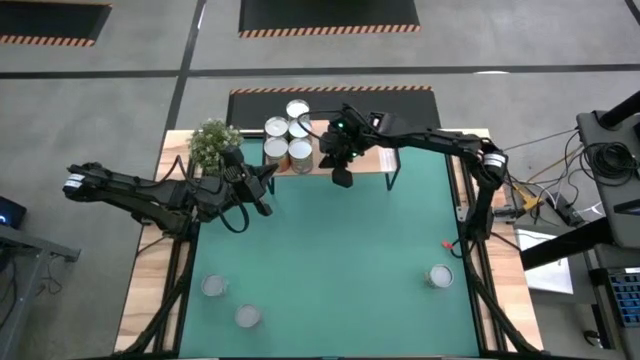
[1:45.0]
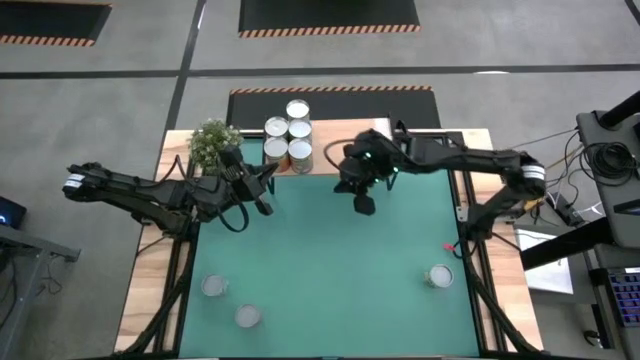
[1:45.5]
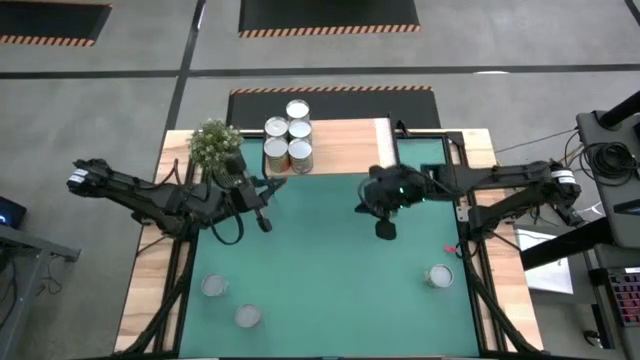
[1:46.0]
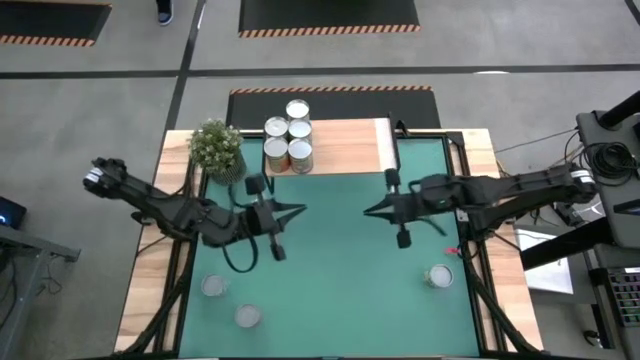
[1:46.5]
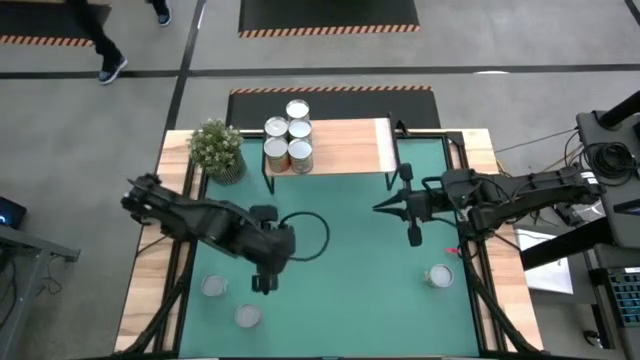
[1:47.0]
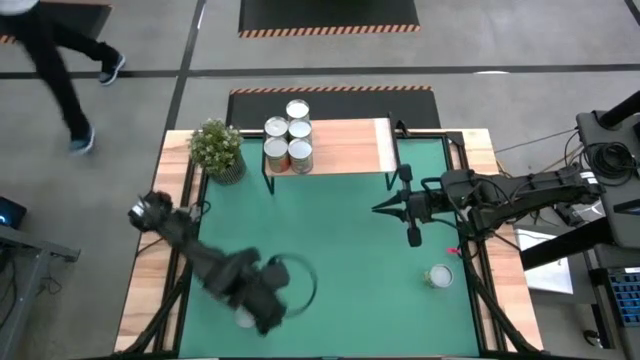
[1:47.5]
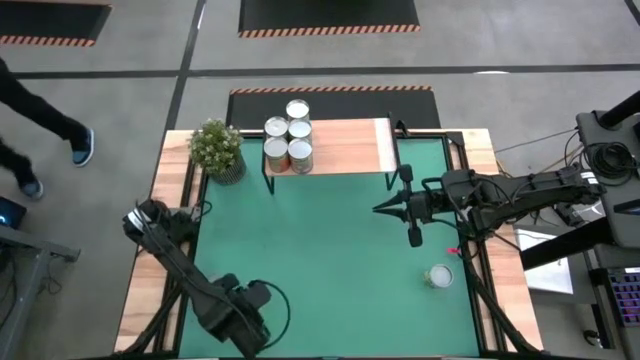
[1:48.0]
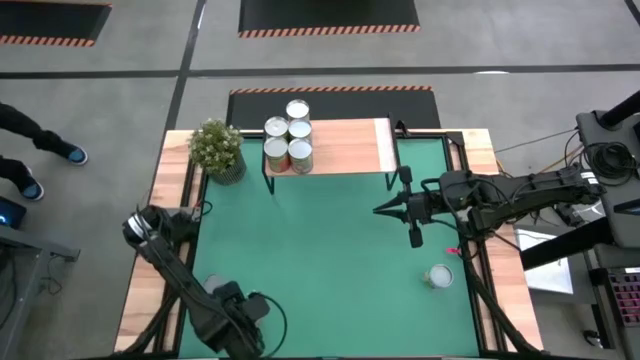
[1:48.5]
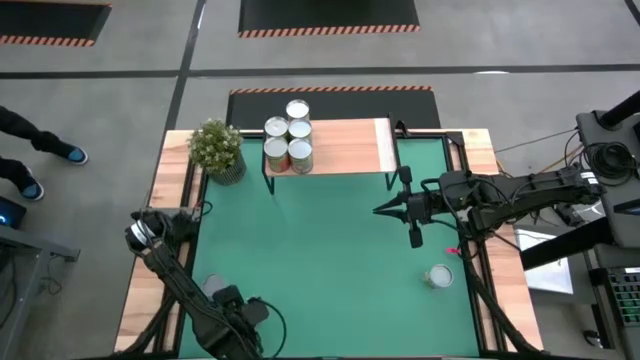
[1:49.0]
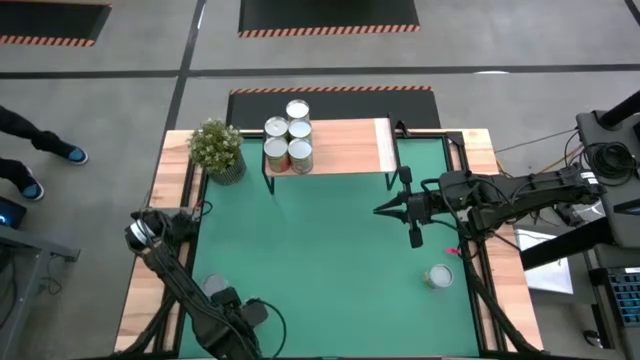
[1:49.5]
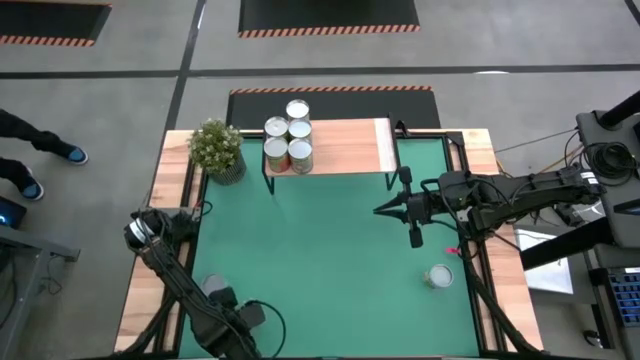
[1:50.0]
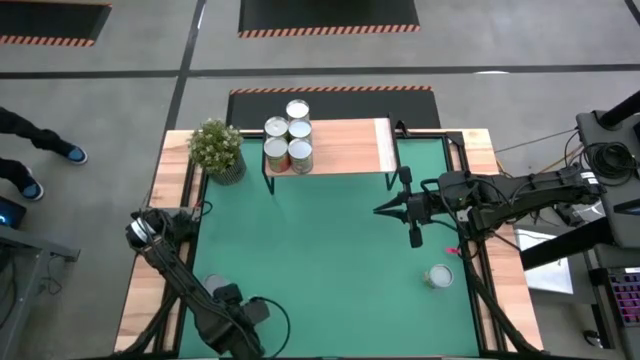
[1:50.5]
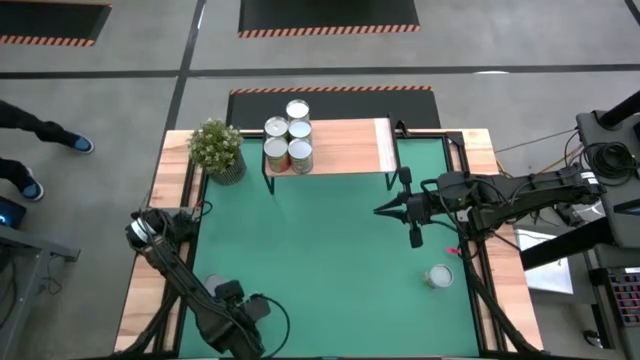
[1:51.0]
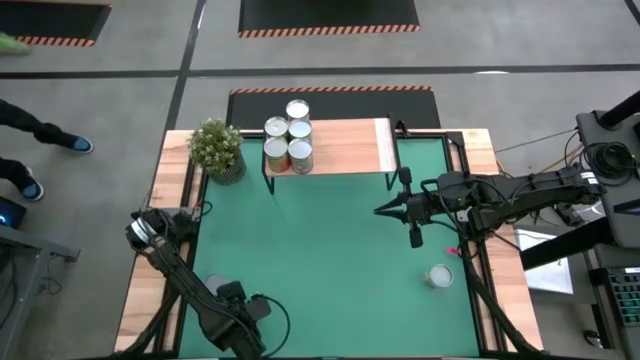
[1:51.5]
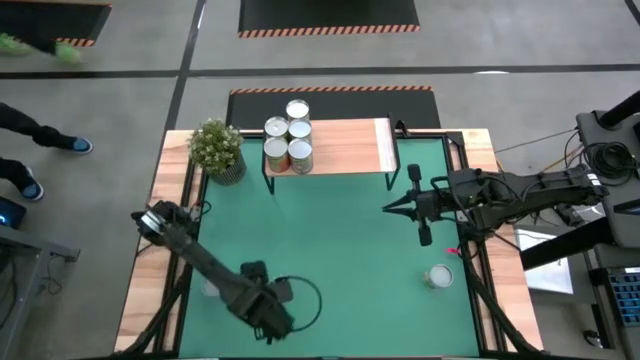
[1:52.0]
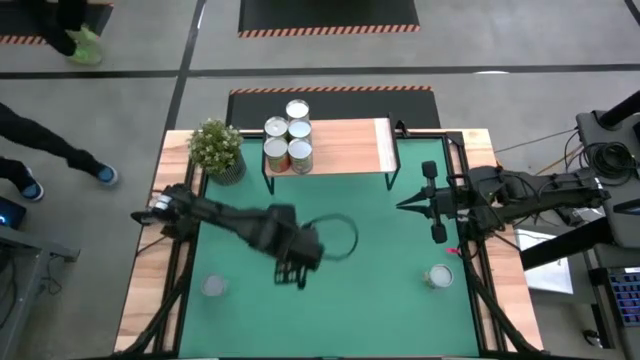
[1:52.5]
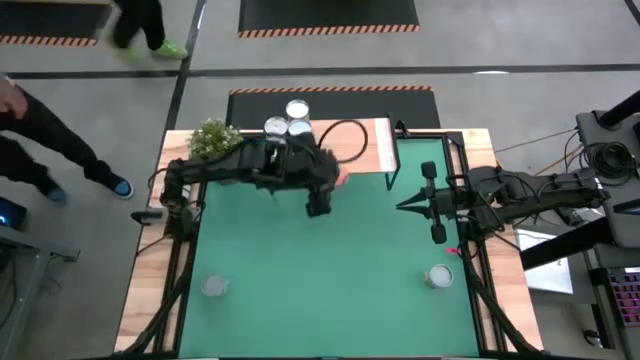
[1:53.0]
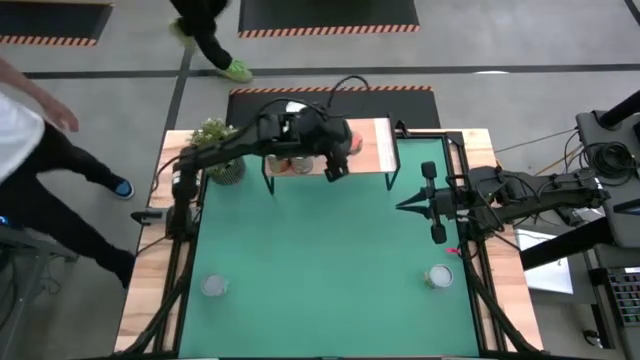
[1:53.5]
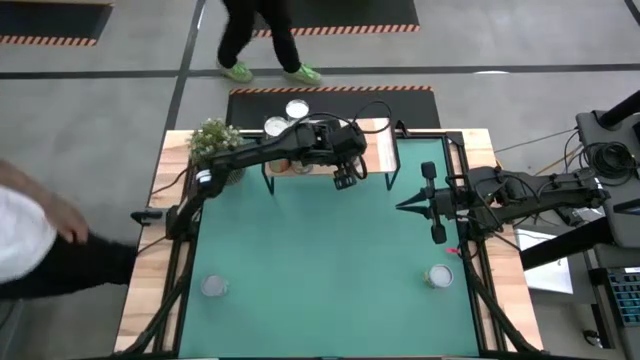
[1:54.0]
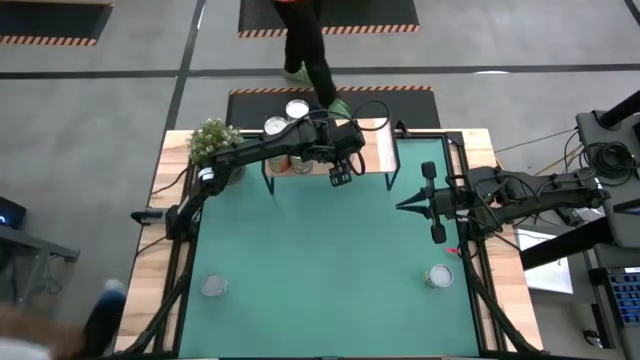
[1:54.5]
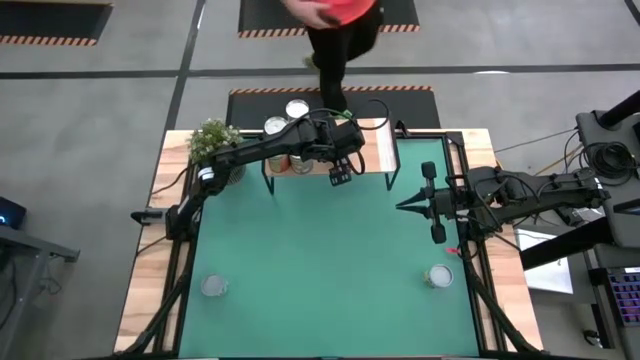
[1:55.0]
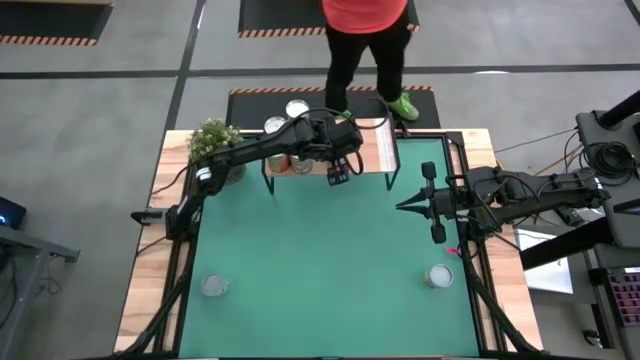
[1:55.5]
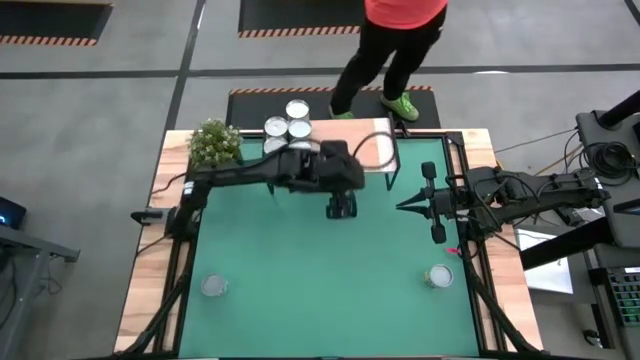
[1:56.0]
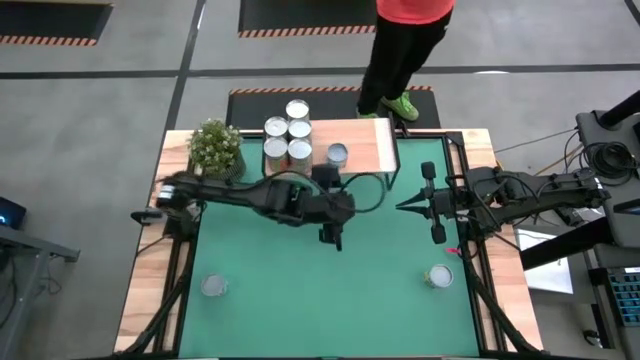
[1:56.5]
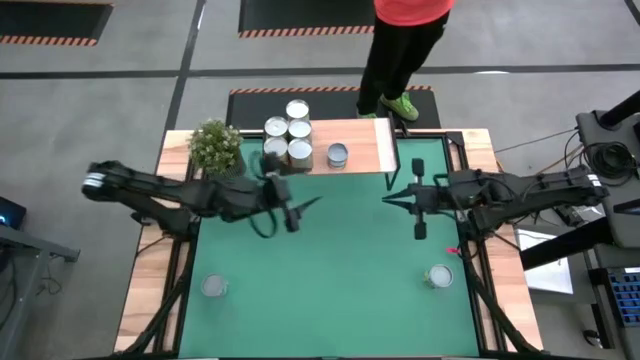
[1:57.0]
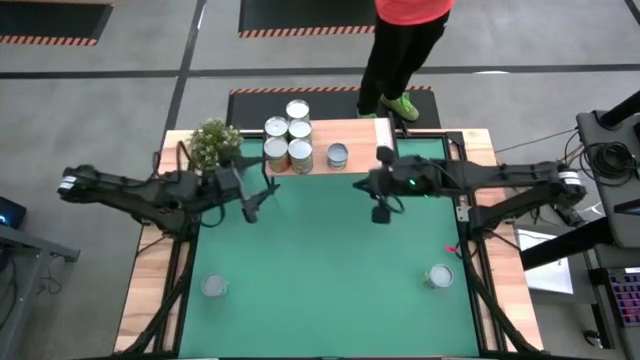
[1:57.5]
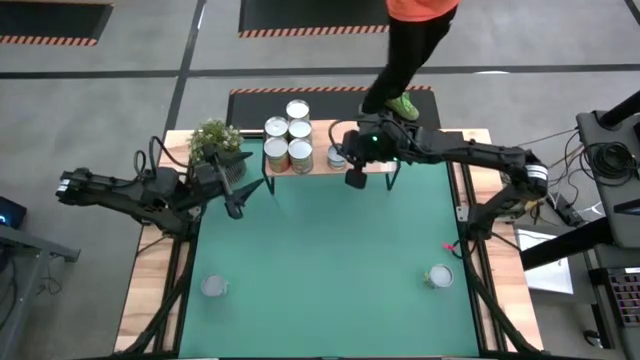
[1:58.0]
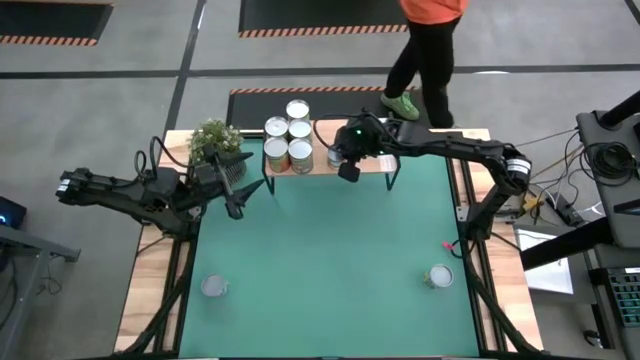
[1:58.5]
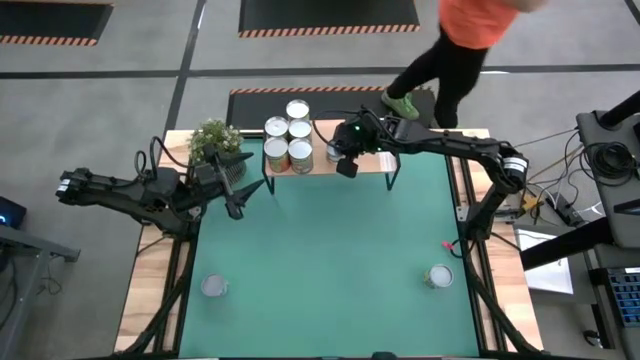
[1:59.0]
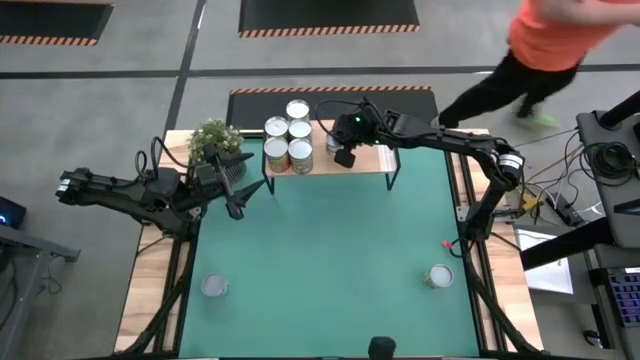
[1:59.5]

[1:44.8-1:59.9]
Task: Pick and place cans onto a shelf
Put the small canned oranges on the shelf

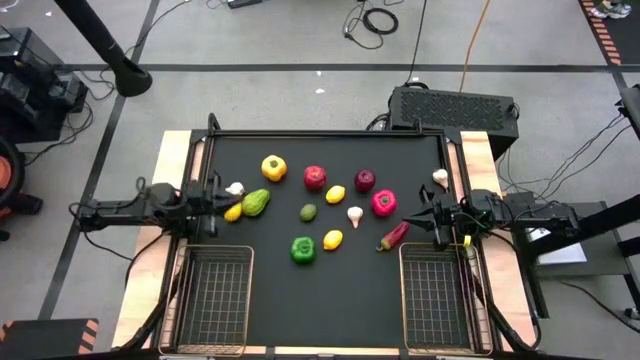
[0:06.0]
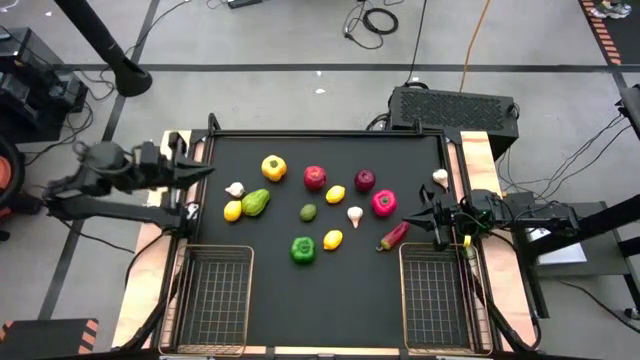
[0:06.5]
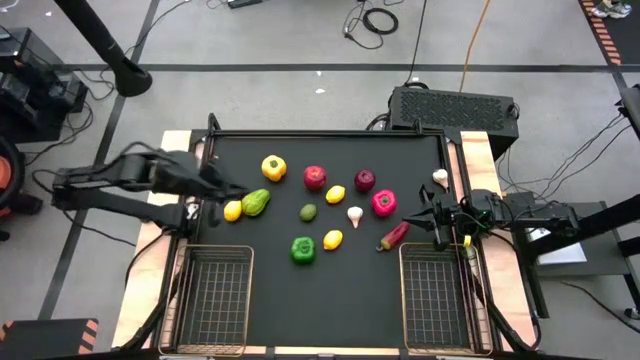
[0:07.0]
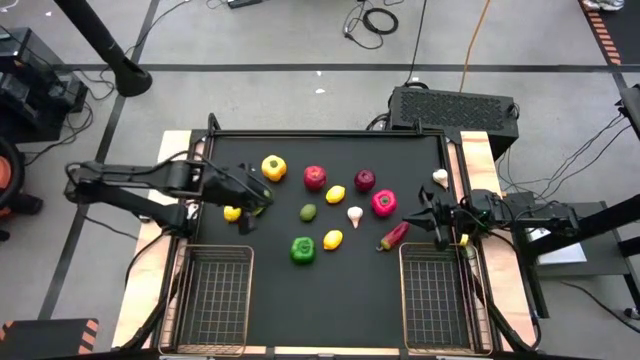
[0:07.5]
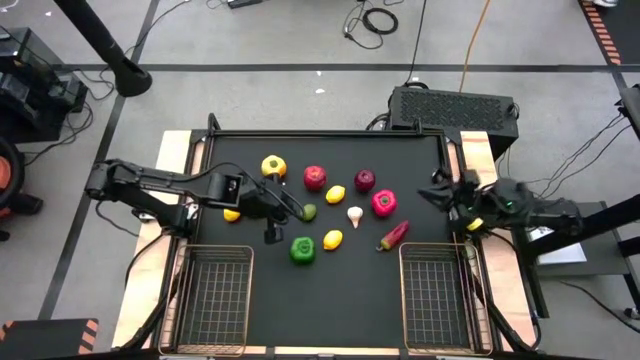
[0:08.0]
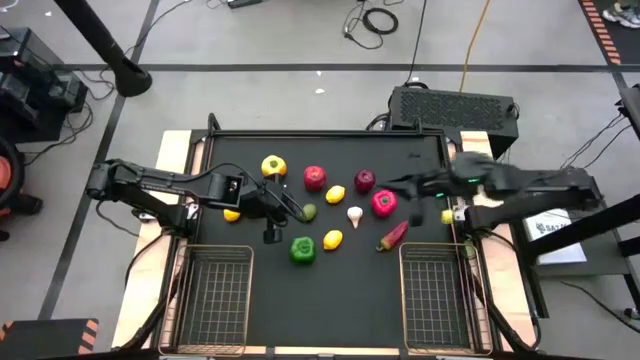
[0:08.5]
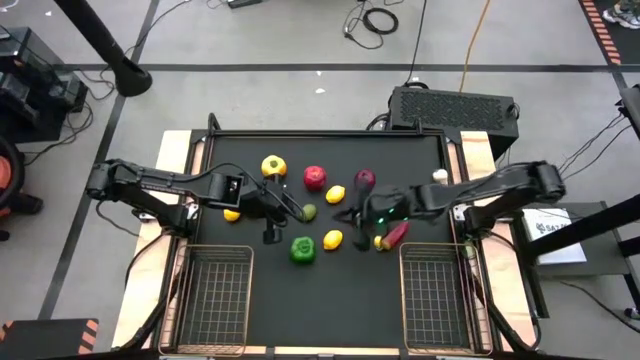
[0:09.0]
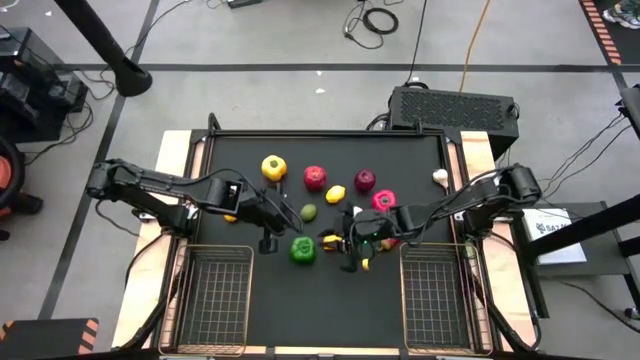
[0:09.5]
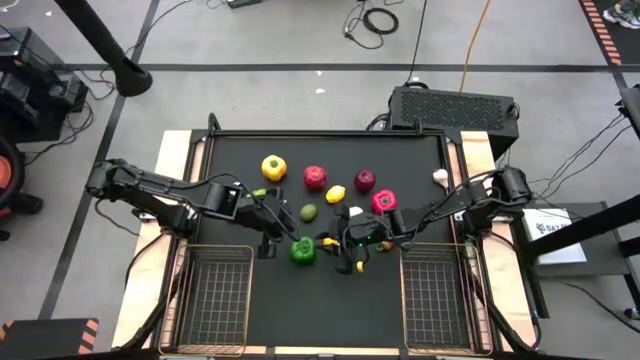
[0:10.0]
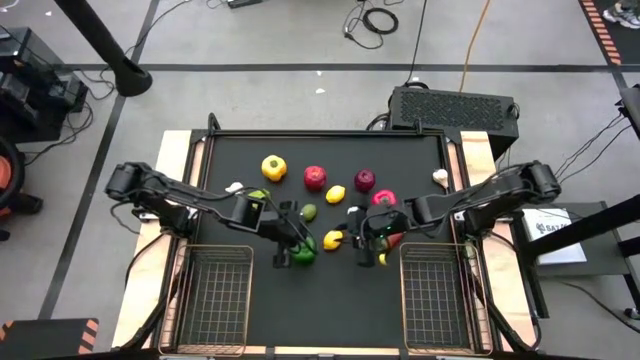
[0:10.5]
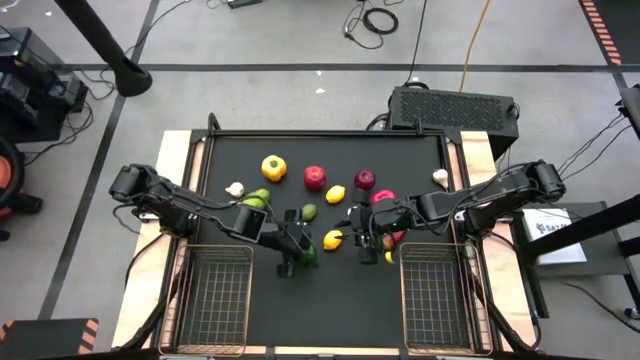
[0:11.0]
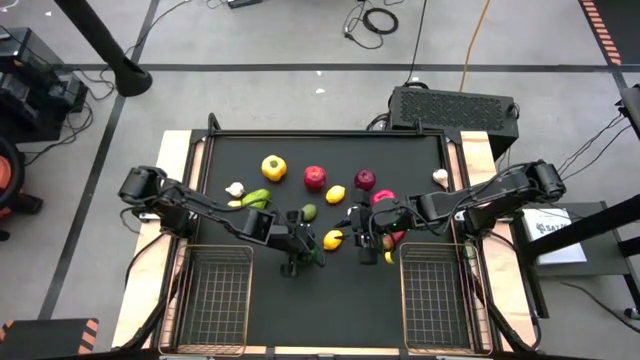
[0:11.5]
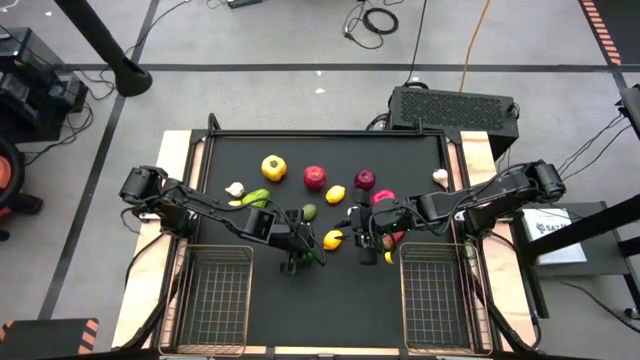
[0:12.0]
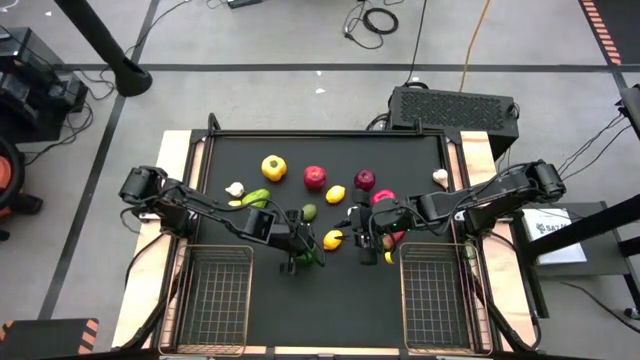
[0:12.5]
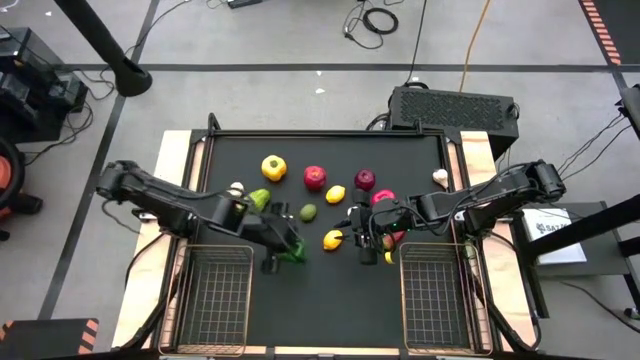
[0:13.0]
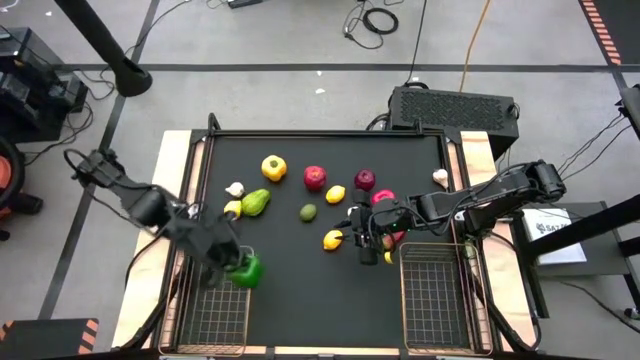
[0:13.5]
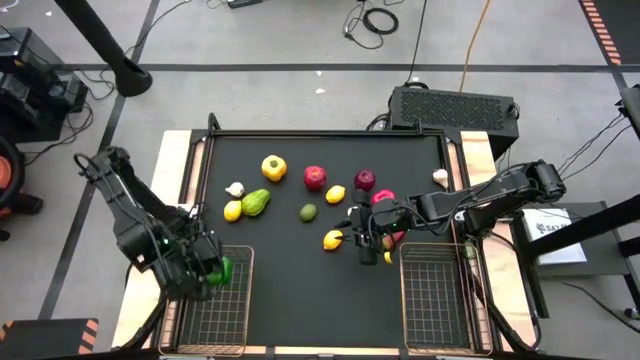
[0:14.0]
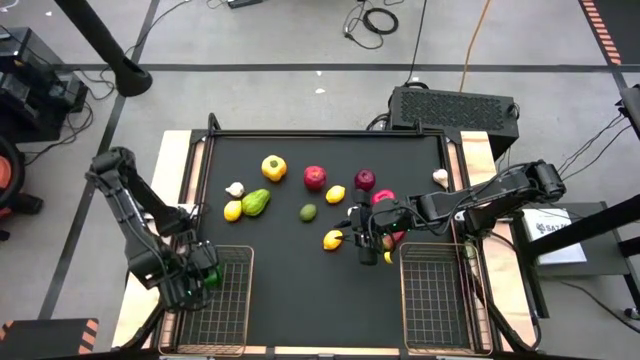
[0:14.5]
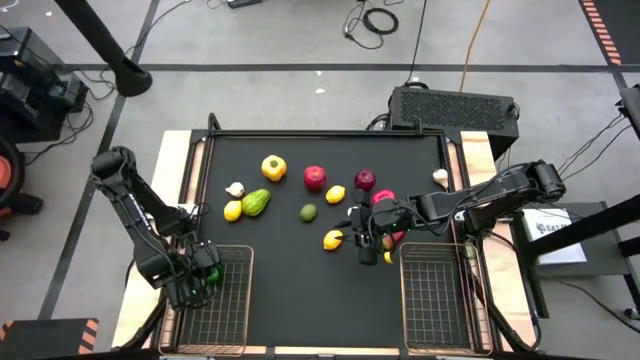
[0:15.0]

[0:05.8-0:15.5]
Task: Sort produce into baskets
Put the green bell pepper into the left gold wire basket
